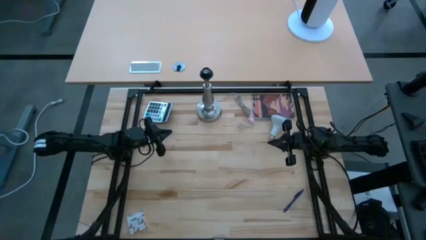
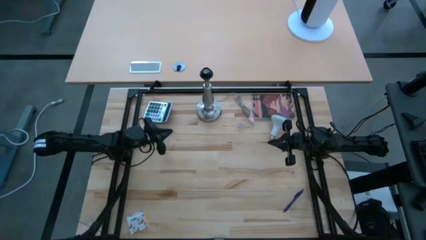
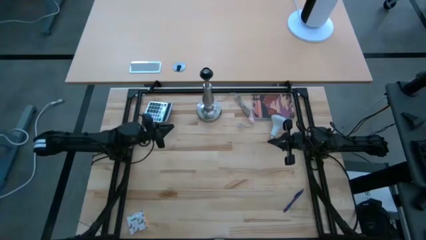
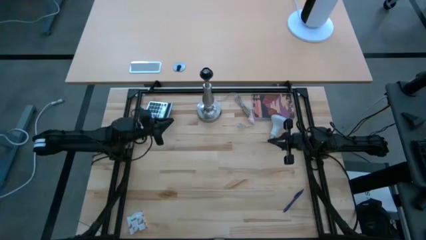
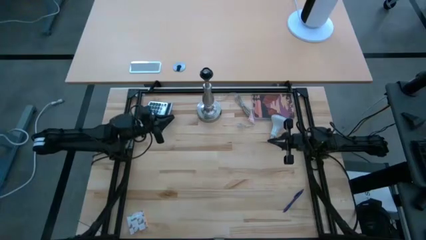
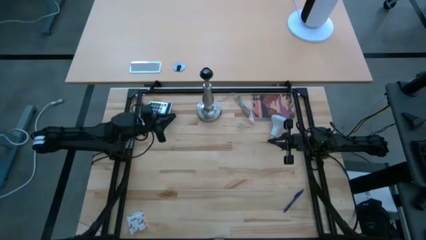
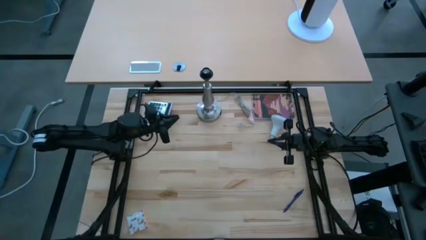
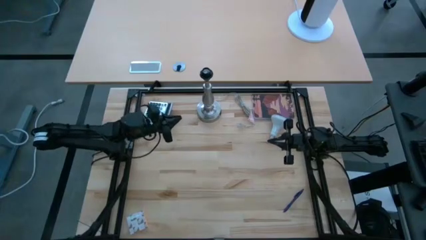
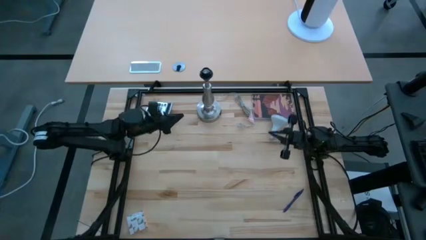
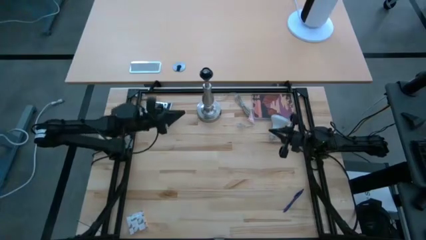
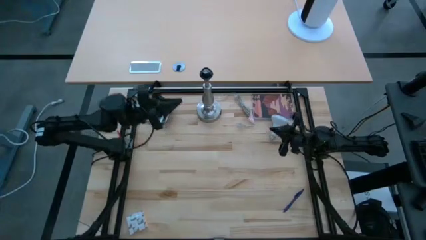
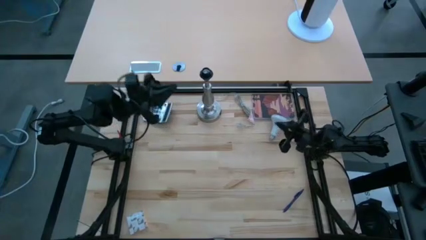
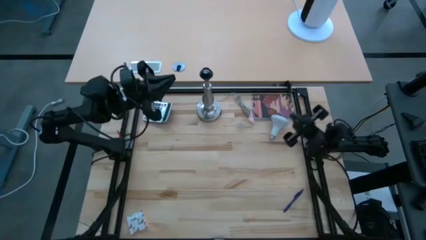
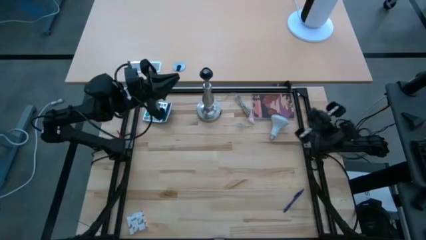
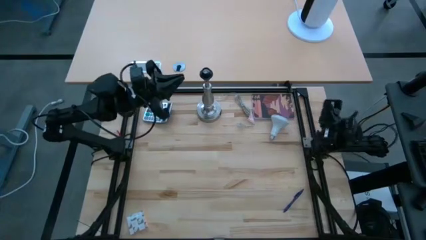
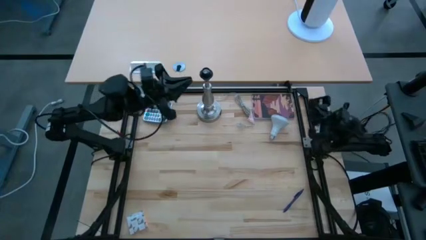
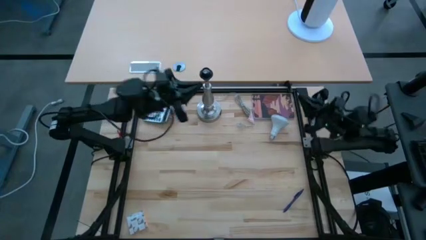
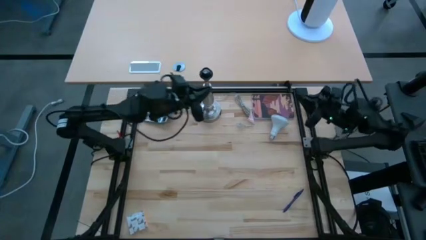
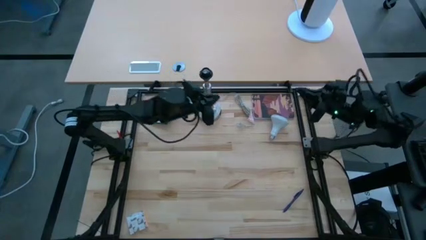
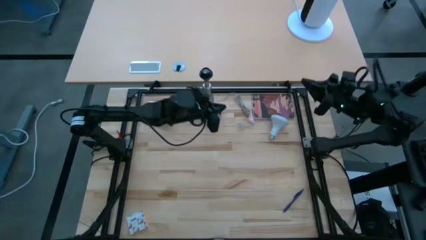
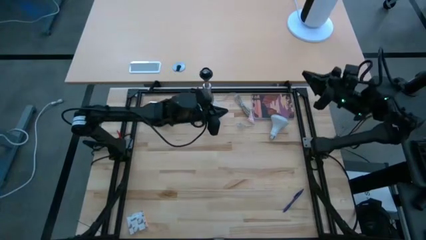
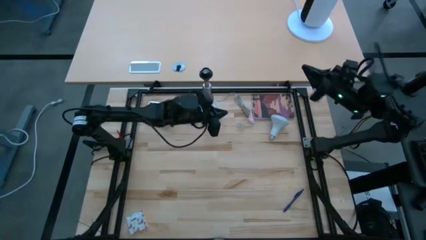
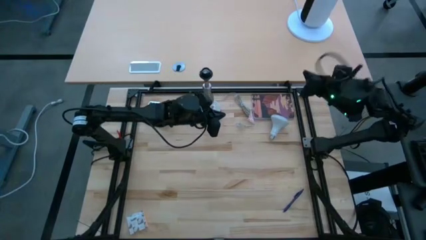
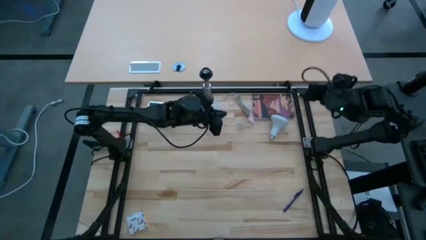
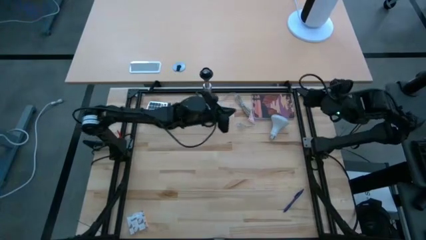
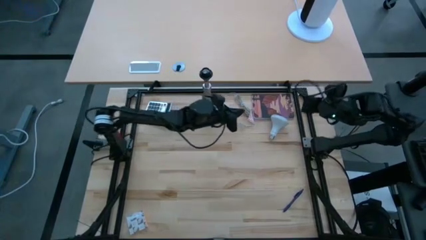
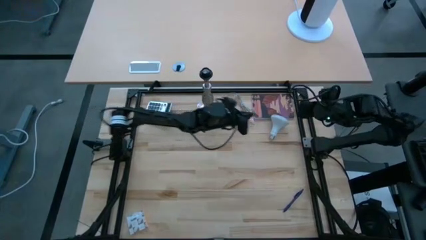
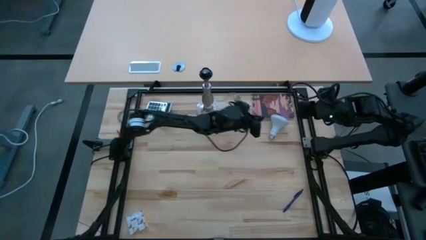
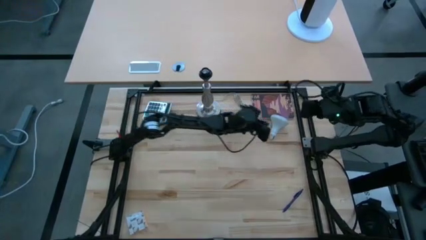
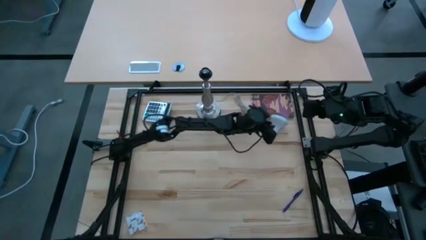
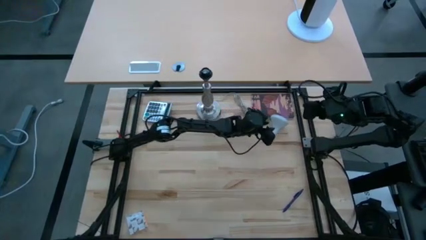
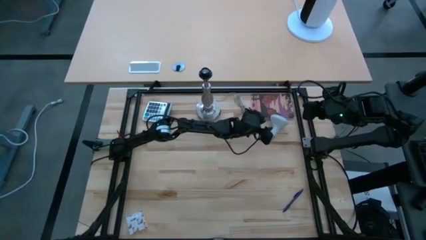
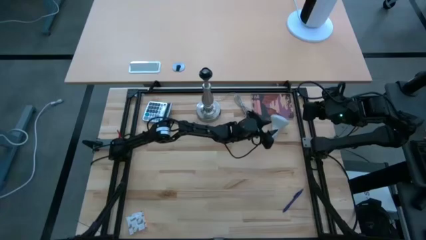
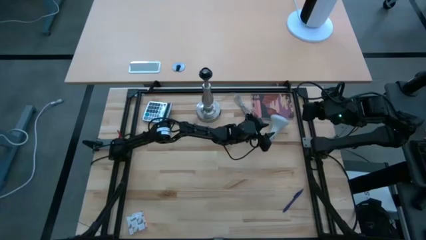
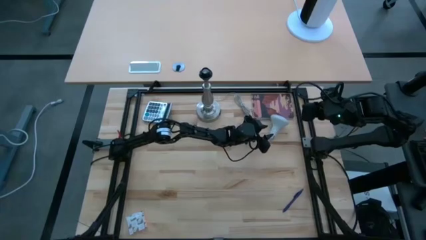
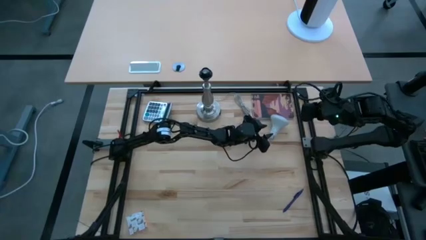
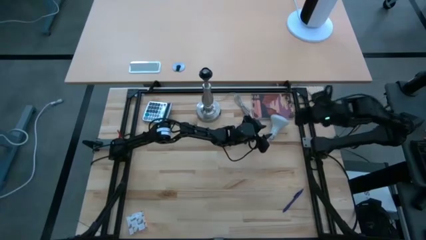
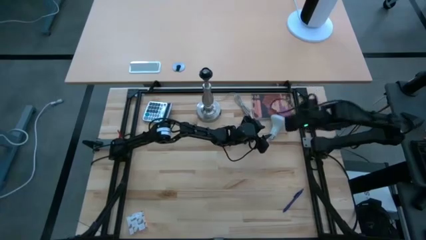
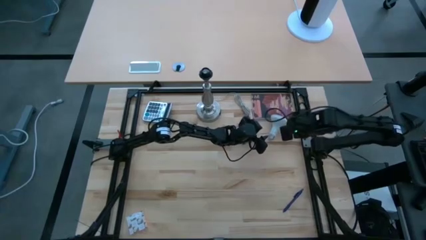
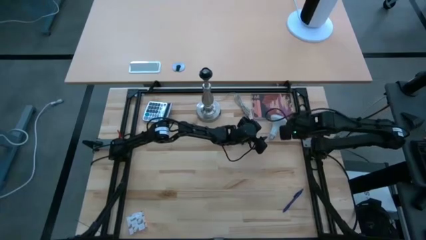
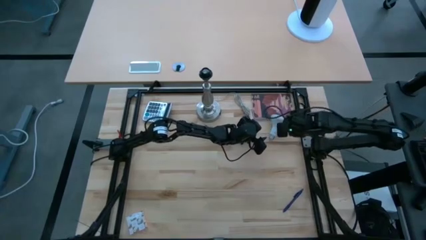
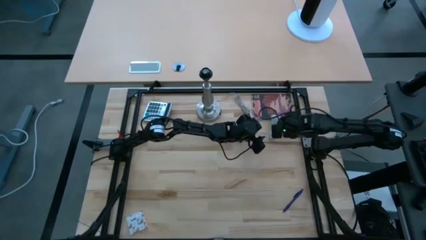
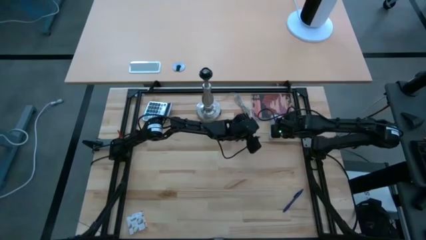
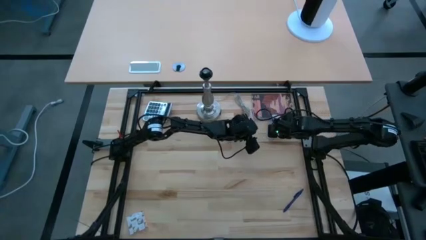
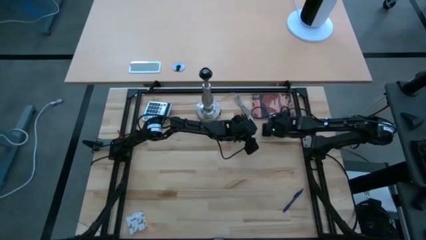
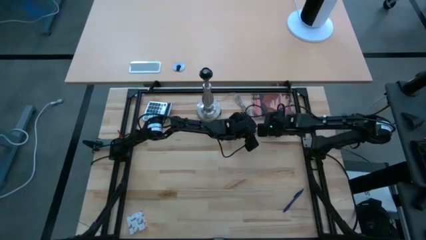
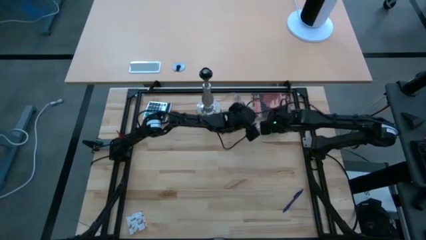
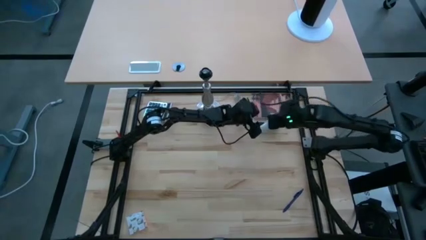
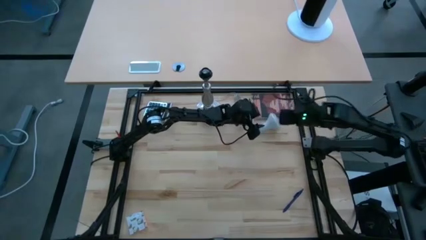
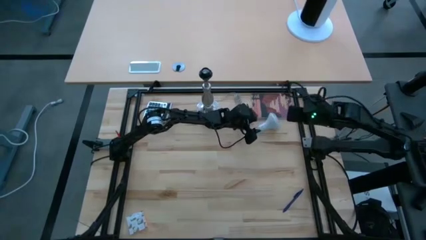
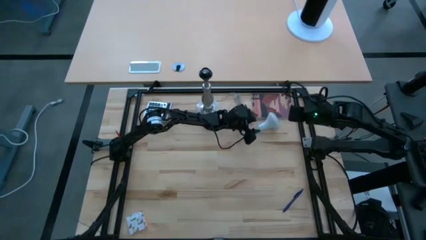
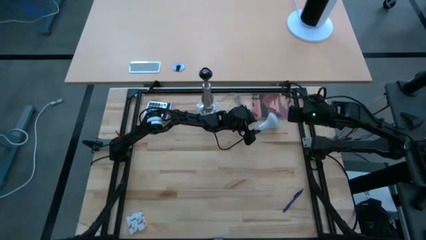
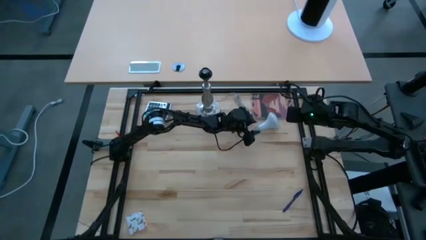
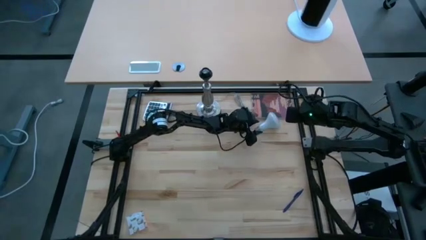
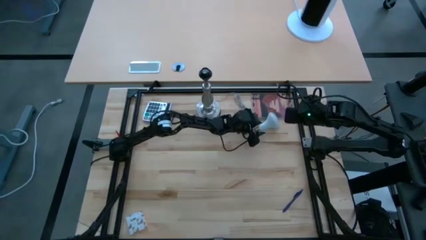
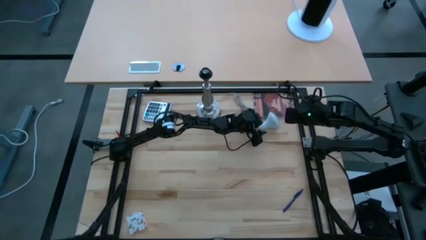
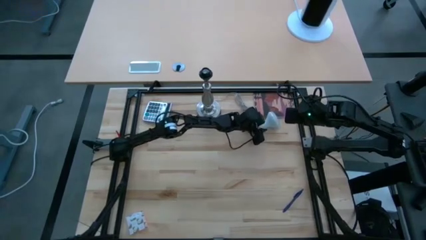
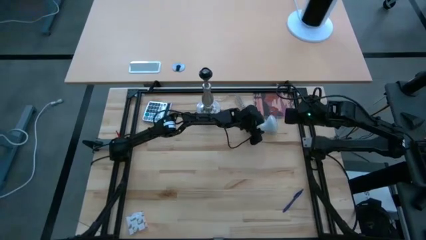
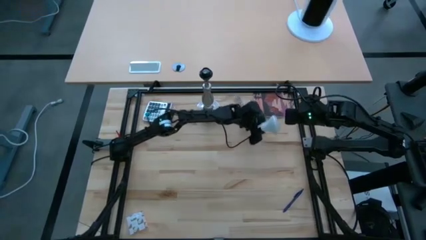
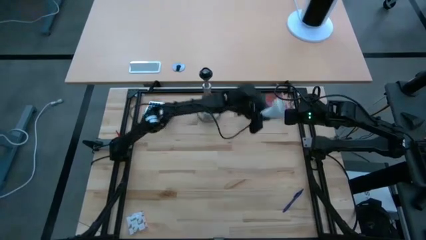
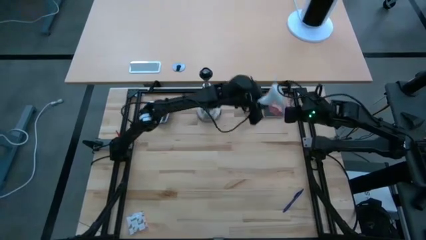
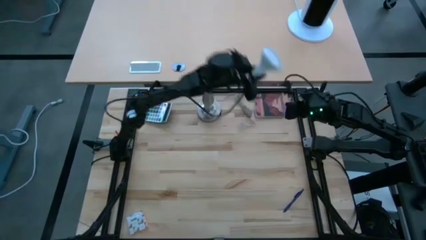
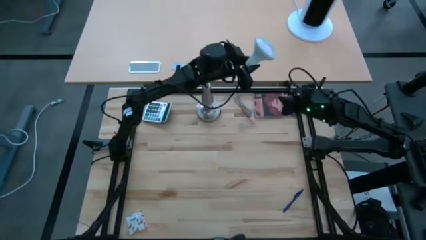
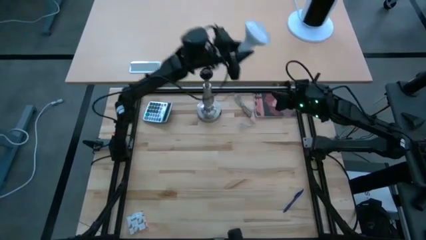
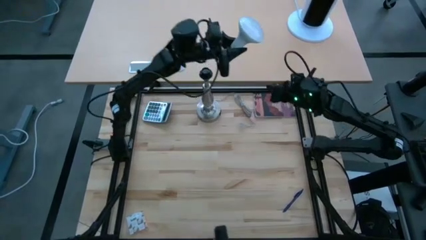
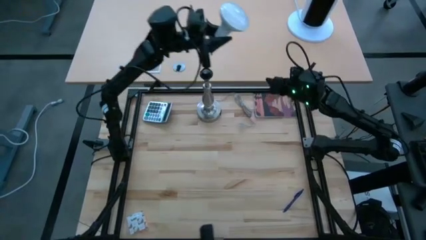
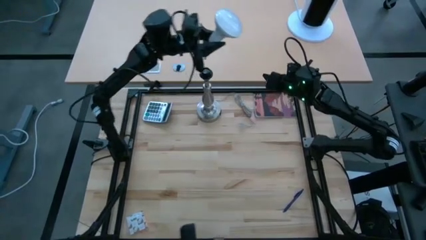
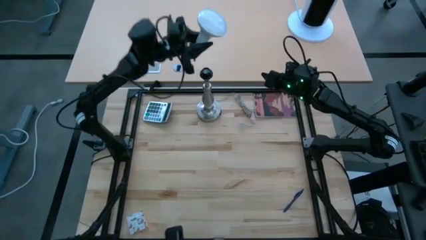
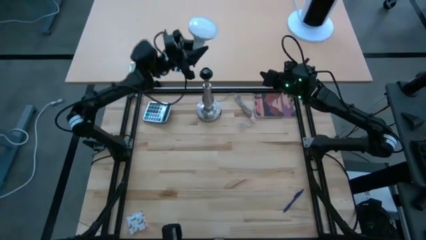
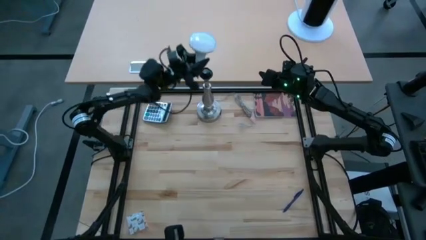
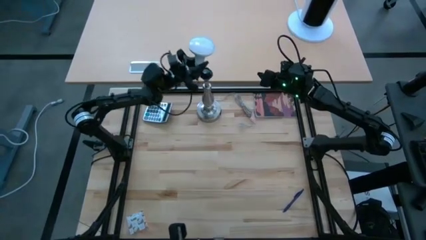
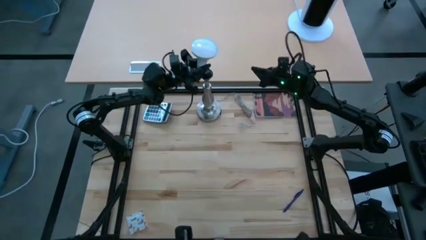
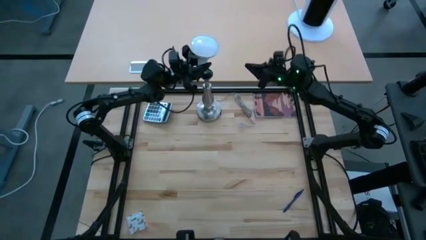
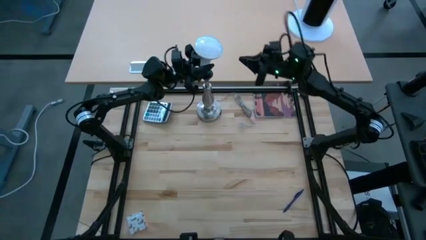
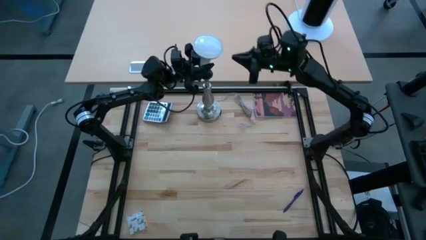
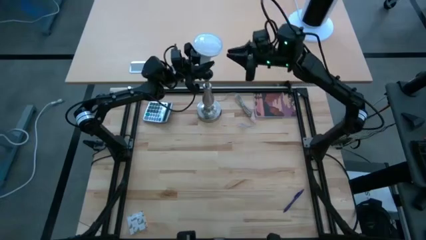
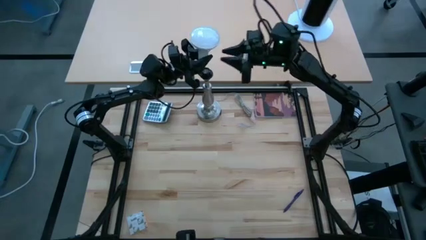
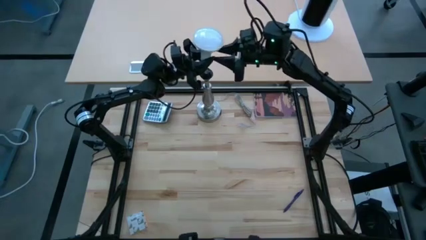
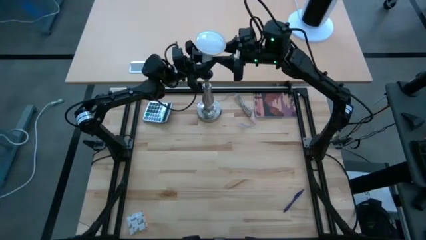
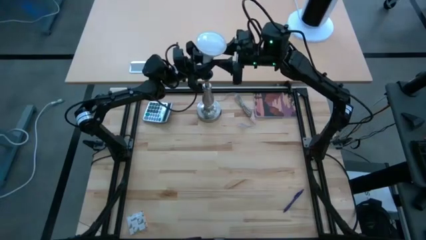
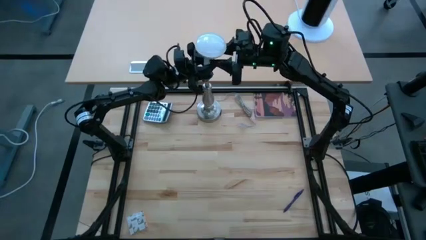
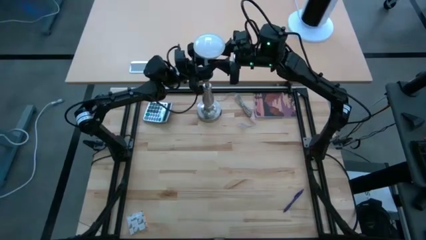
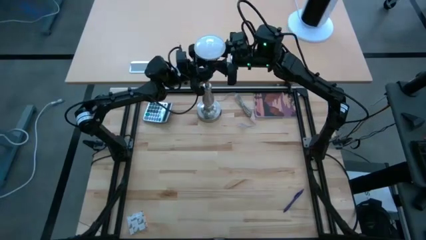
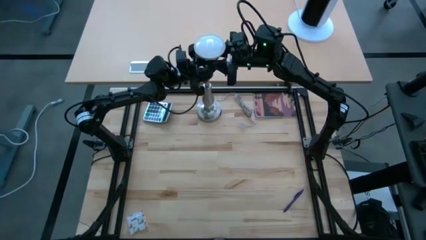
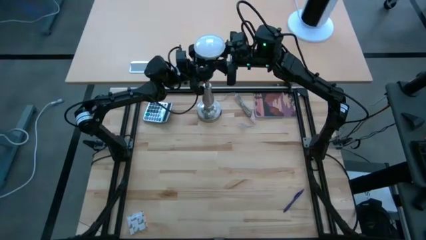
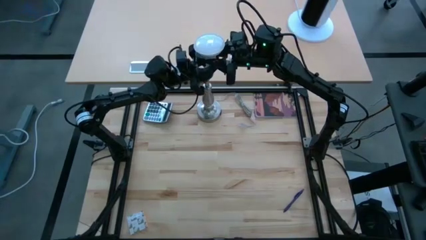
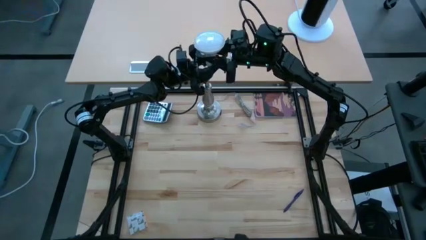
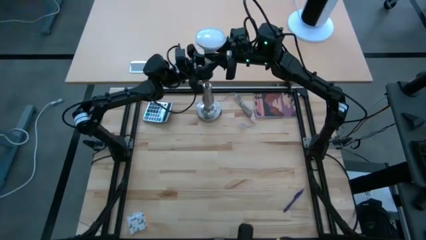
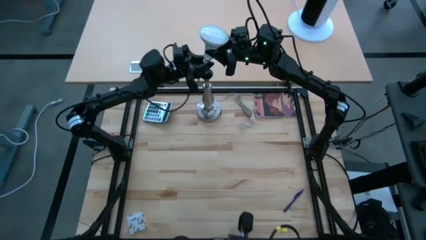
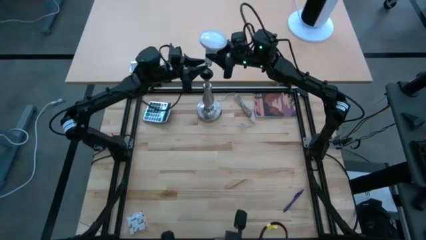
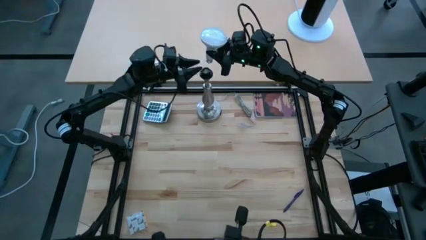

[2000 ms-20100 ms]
Task: Screw lightbulb
Insert the lightbulb into the table lamp
